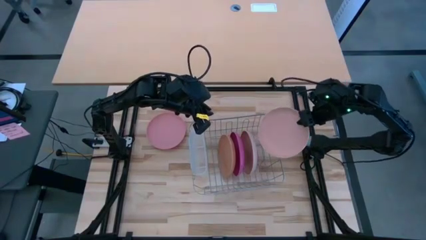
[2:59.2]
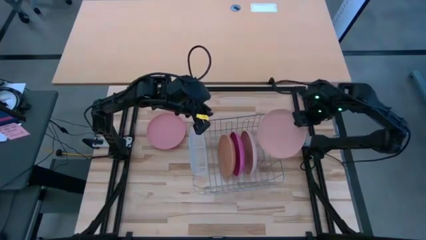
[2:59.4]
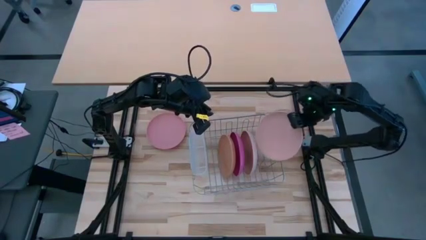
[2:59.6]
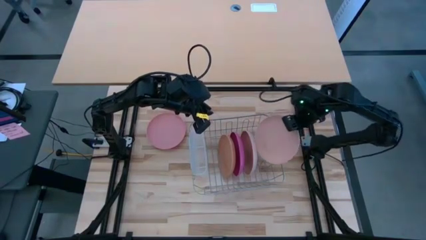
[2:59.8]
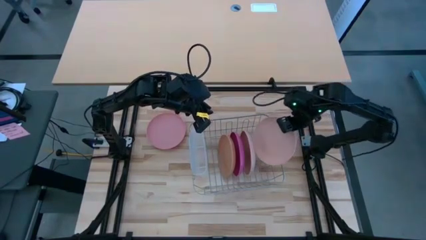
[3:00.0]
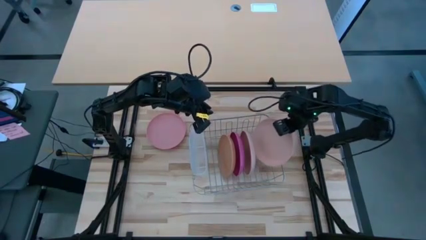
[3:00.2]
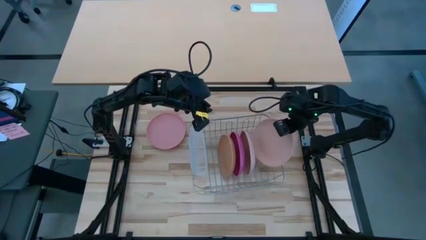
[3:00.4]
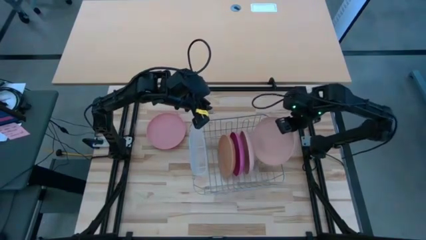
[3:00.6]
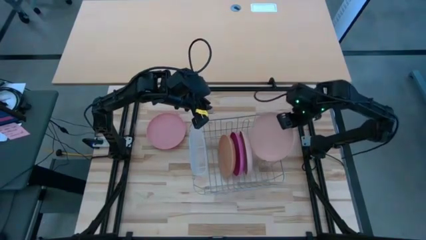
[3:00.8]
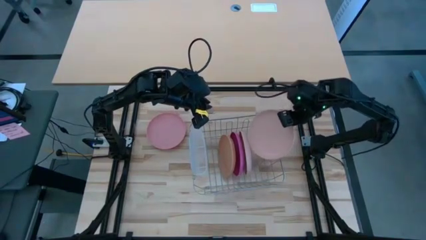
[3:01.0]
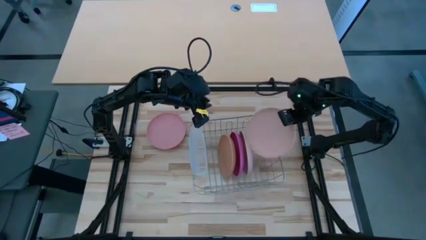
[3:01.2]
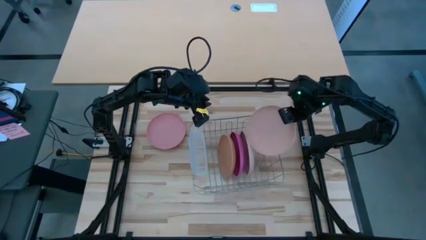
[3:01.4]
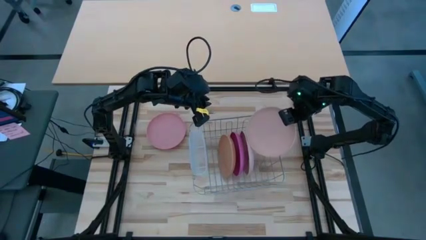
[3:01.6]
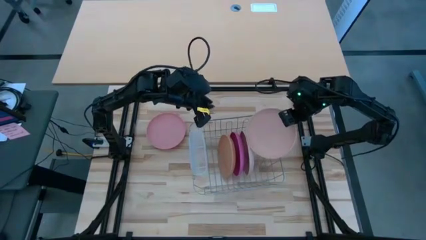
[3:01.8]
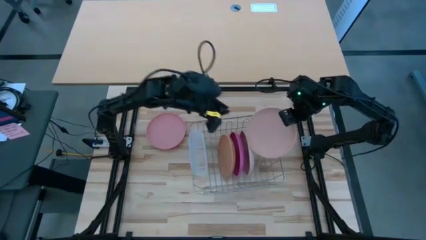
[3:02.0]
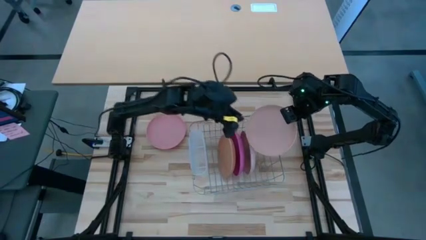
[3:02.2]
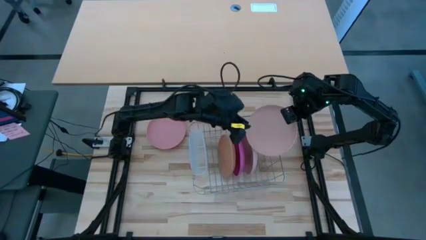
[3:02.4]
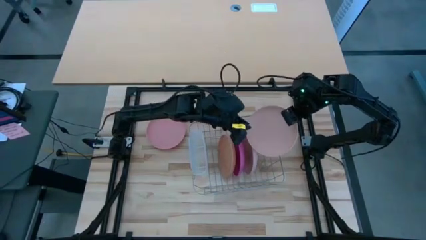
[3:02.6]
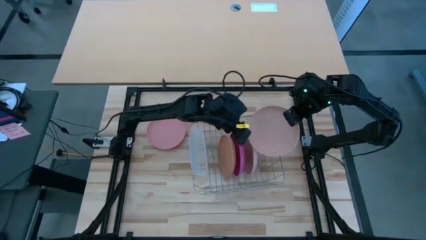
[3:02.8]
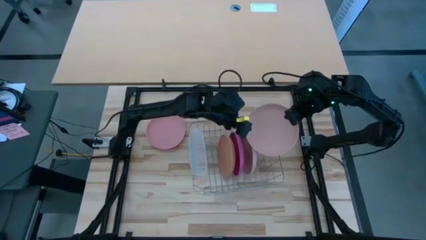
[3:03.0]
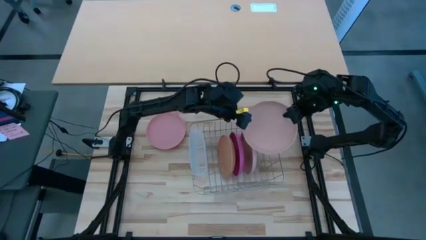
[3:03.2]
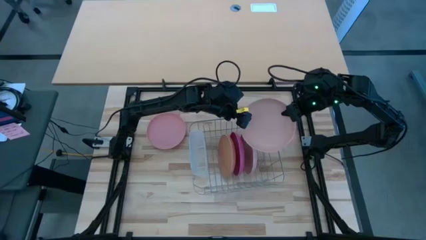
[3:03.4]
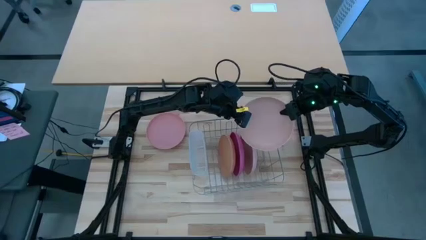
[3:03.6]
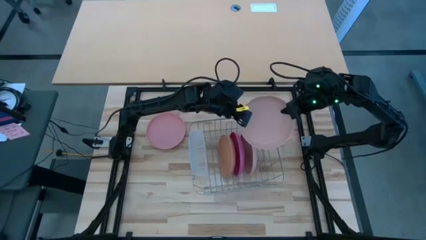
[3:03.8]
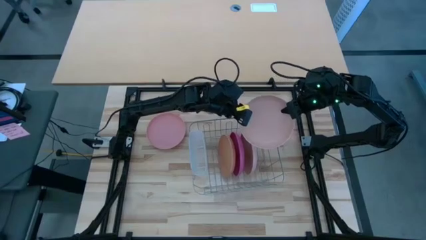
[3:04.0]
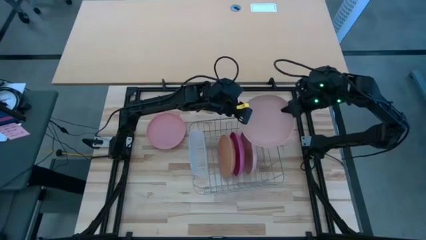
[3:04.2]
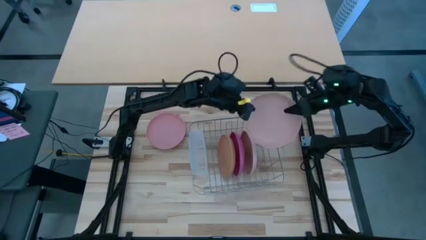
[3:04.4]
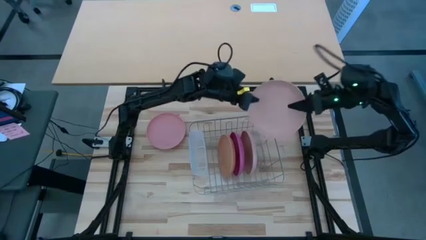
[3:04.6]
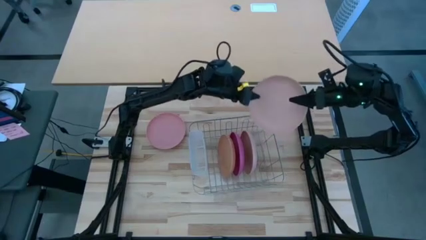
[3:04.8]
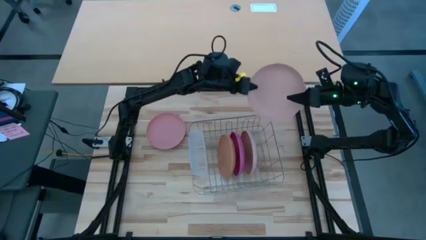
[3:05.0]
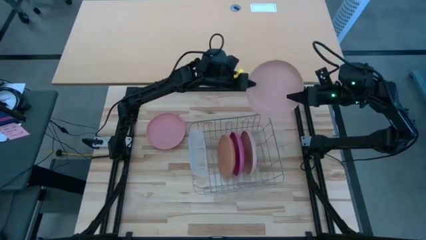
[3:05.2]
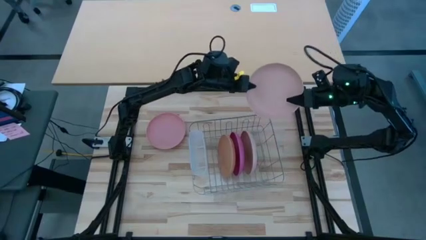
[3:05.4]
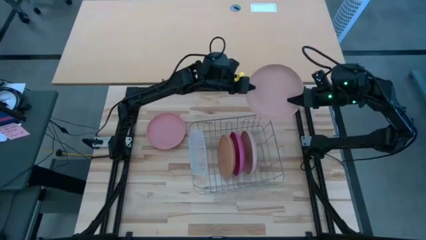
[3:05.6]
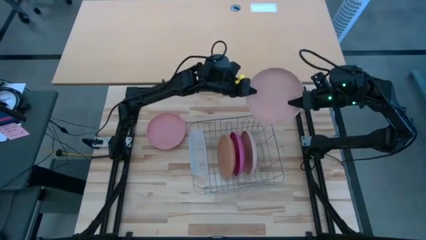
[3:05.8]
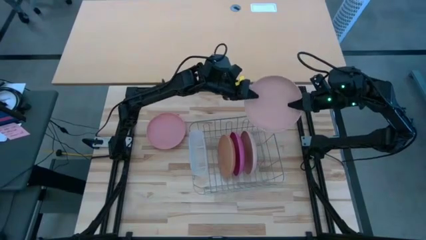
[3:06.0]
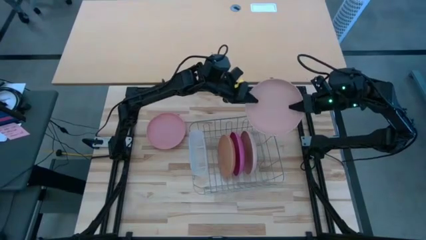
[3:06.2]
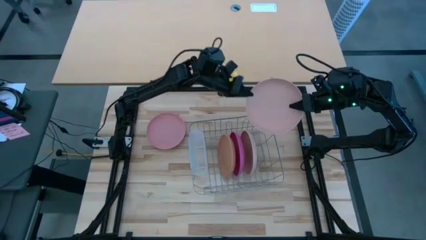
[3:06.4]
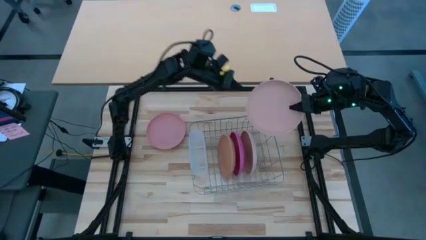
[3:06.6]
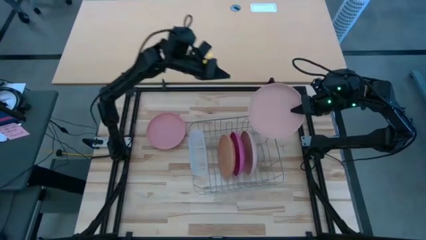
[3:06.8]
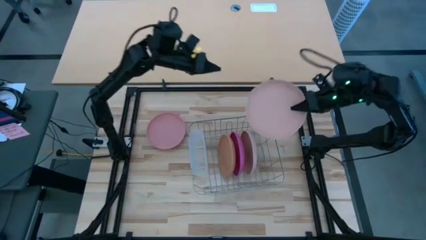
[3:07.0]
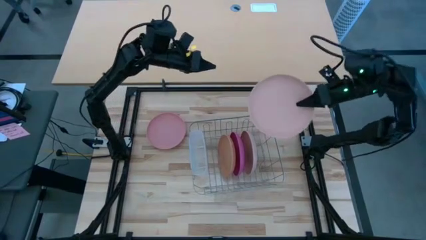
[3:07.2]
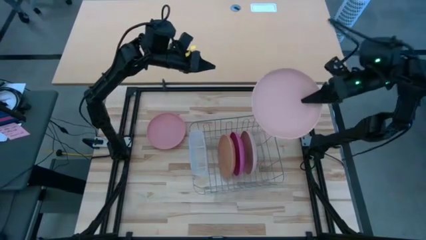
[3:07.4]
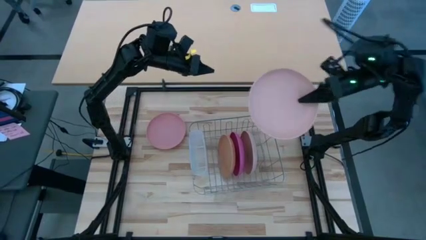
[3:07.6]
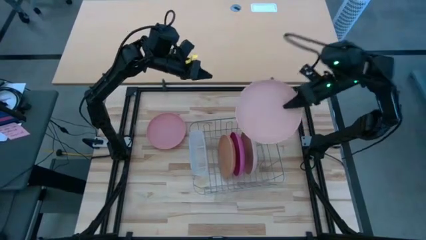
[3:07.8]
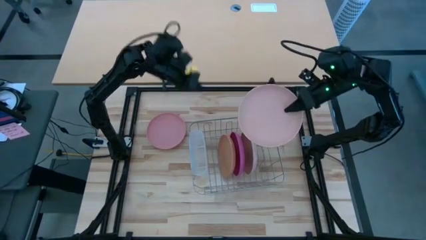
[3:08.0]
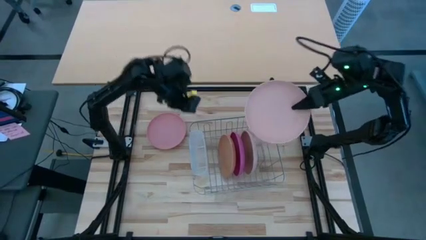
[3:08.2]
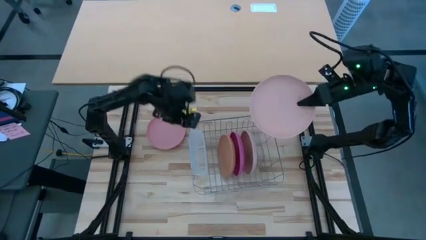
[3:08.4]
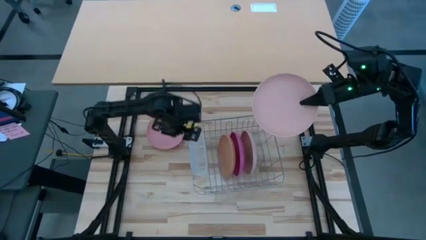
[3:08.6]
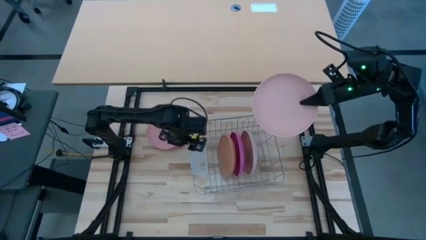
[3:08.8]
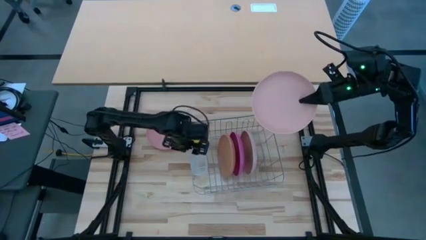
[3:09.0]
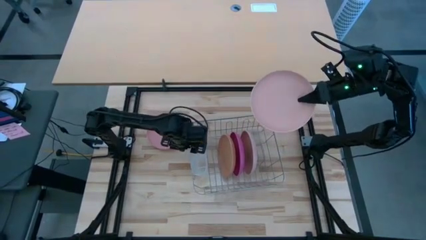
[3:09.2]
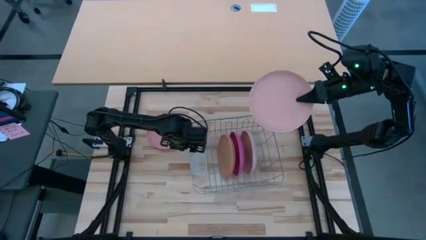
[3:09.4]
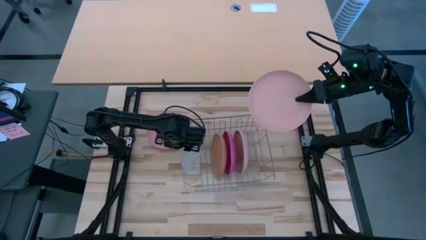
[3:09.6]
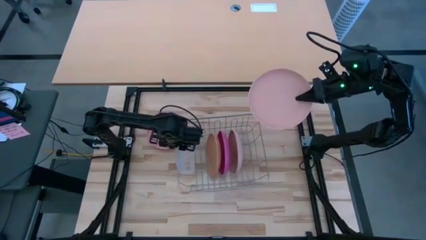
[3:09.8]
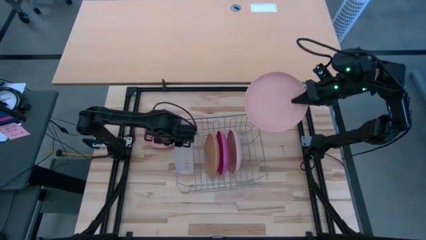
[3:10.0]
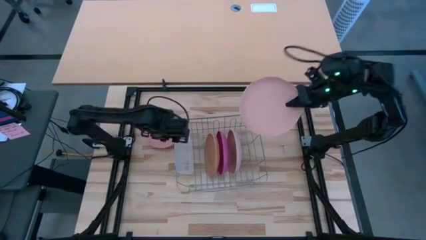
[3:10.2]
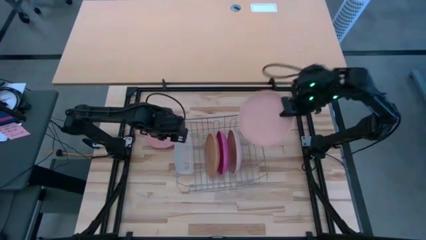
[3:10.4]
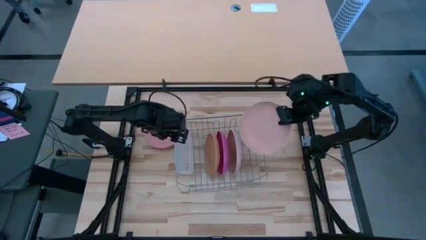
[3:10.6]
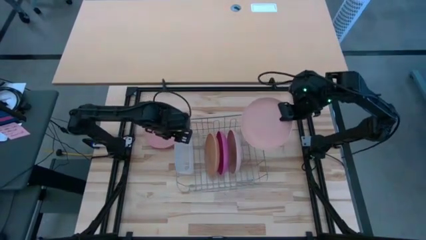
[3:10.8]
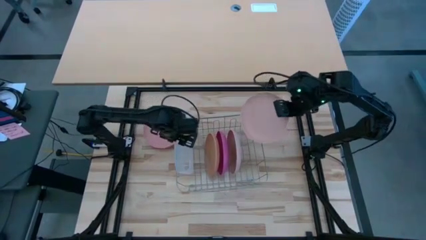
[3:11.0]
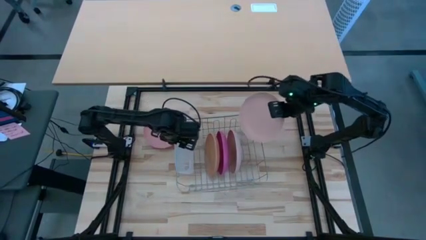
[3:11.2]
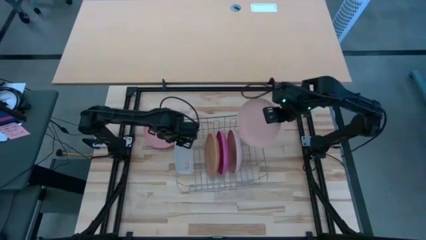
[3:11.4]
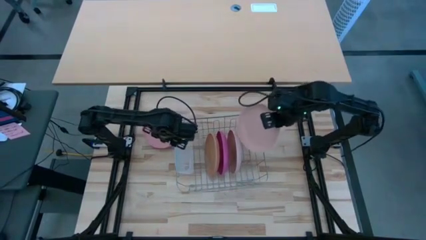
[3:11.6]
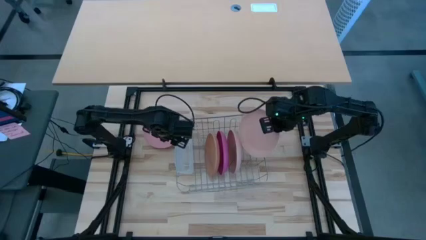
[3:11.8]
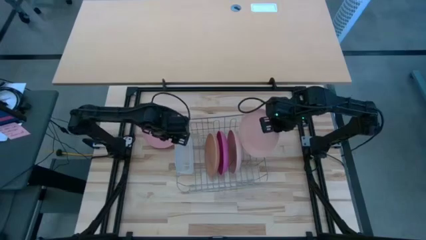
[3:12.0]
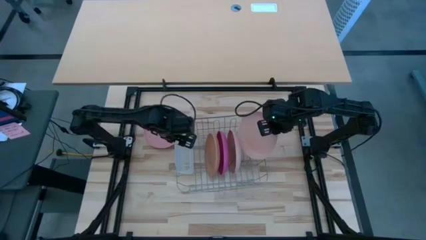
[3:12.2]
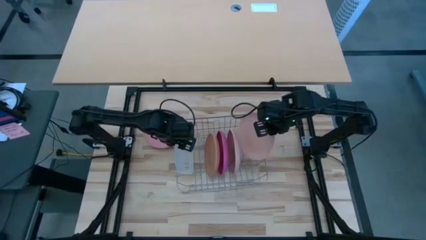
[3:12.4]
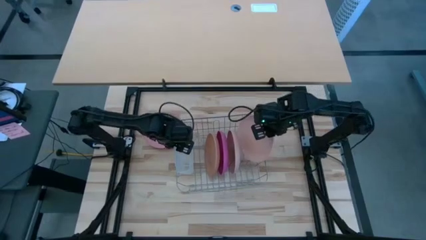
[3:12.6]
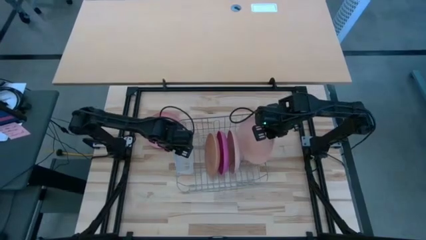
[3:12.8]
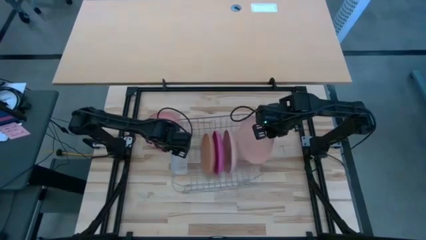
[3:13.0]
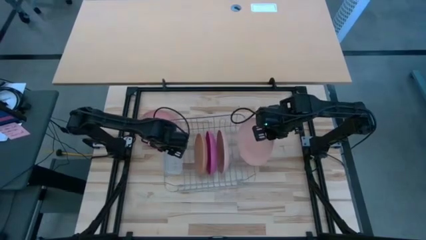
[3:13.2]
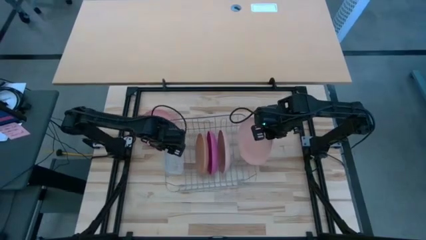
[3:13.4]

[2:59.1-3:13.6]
Task: Sort dishes
Put the light orange plate in the dish rack

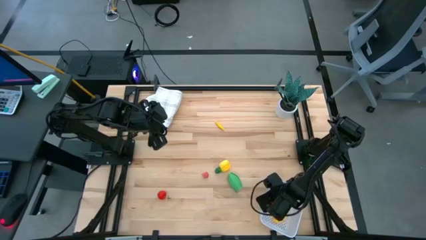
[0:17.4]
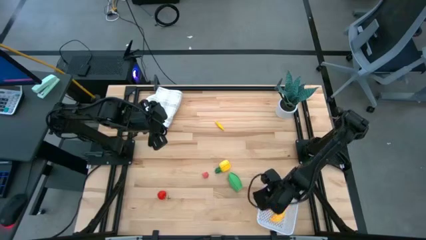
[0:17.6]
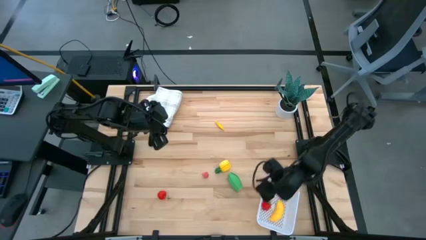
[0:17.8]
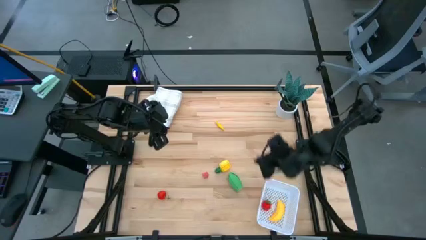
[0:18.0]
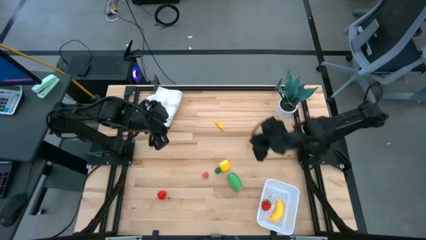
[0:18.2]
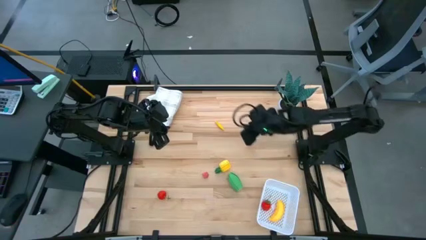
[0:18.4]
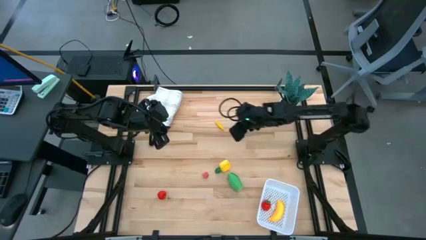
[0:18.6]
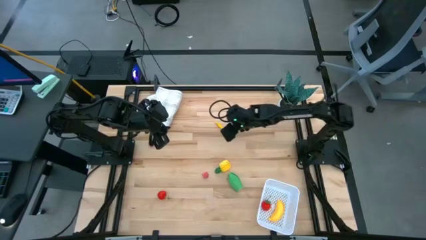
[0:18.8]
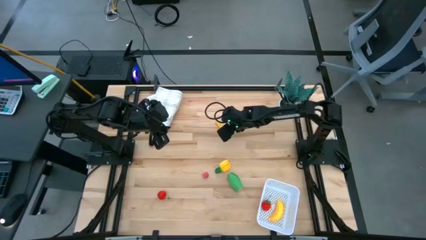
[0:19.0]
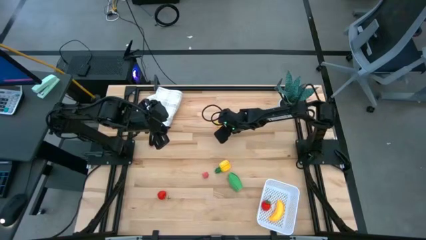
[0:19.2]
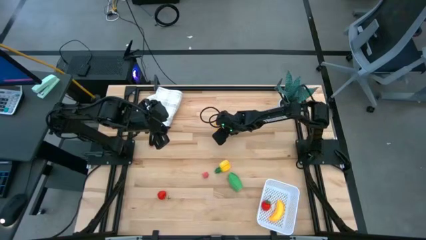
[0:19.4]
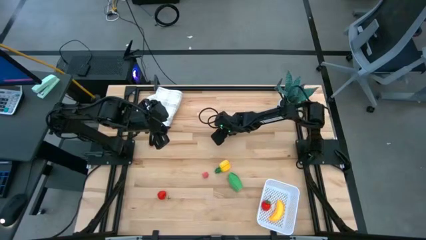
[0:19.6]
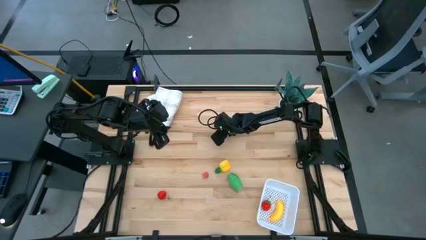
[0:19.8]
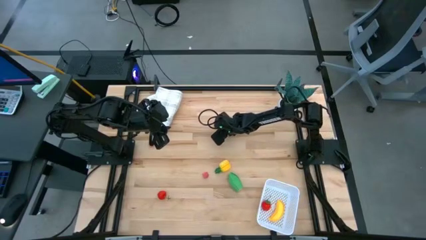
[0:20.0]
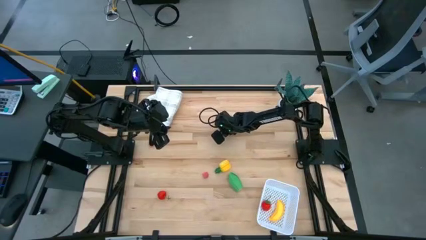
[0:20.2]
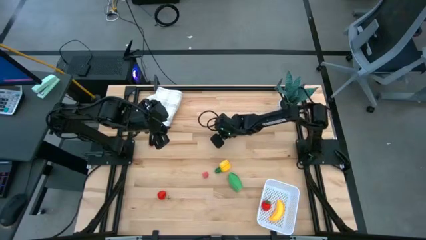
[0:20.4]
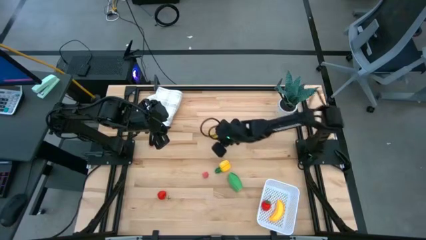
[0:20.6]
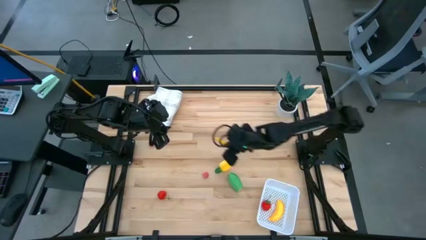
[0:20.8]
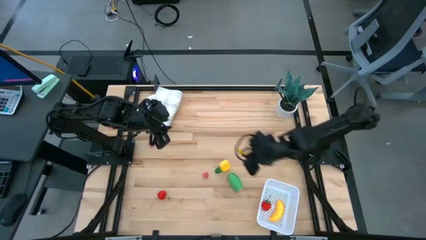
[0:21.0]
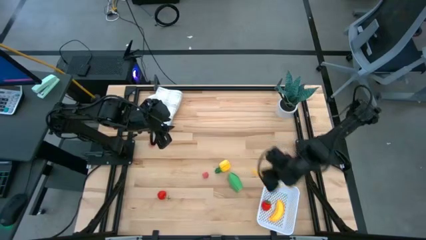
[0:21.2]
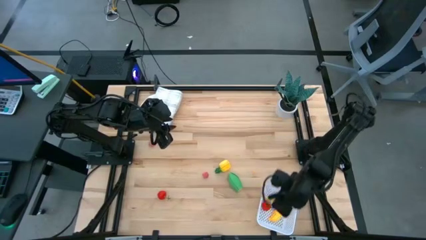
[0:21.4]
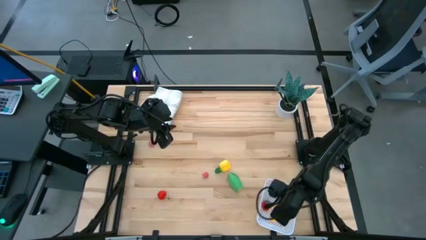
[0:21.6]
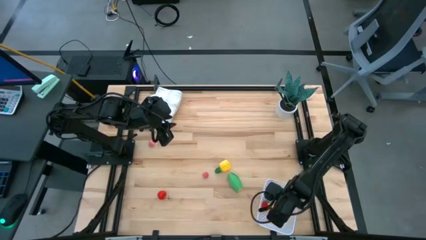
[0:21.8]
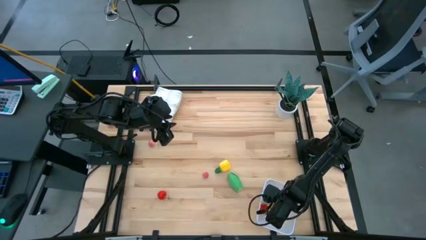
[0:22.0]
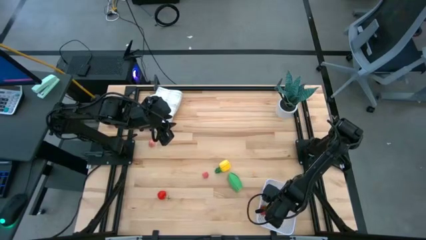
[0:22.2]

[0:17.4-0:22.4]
Task: Pick and placing Produce into tupperware
Put the yellow corn into the white basket
